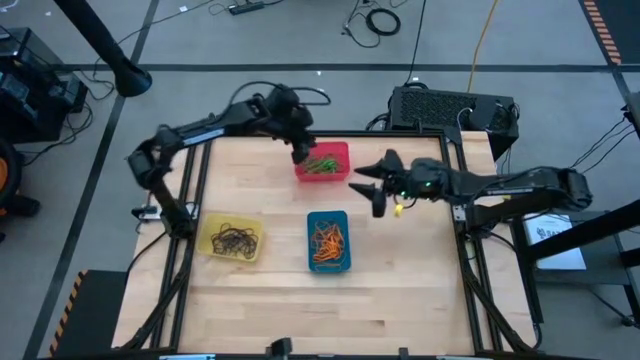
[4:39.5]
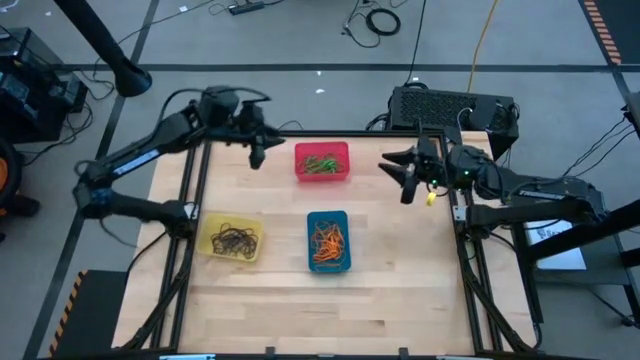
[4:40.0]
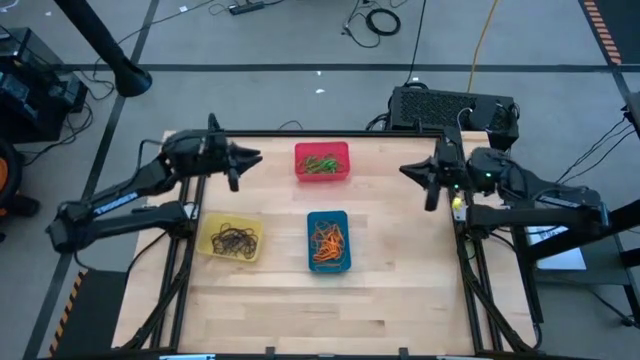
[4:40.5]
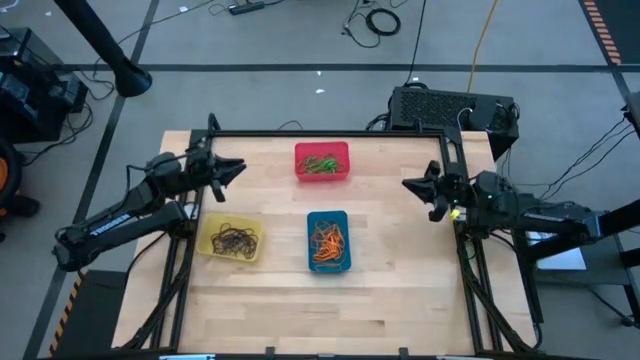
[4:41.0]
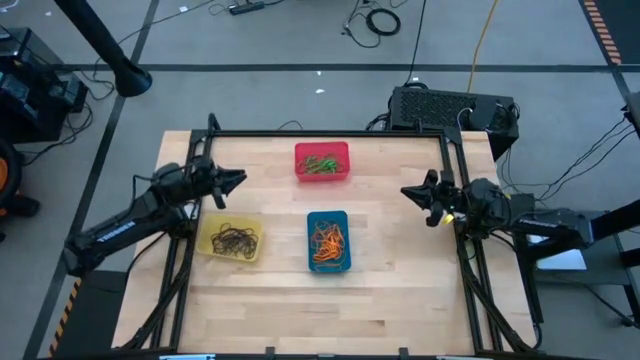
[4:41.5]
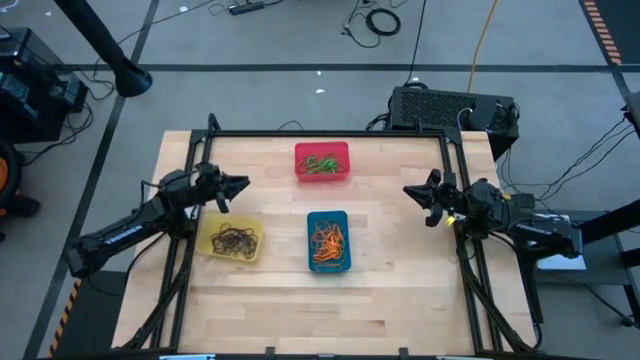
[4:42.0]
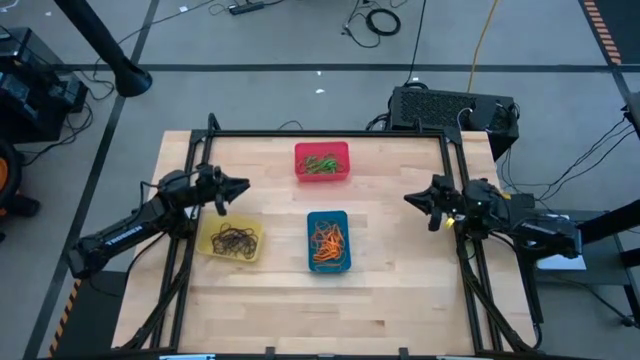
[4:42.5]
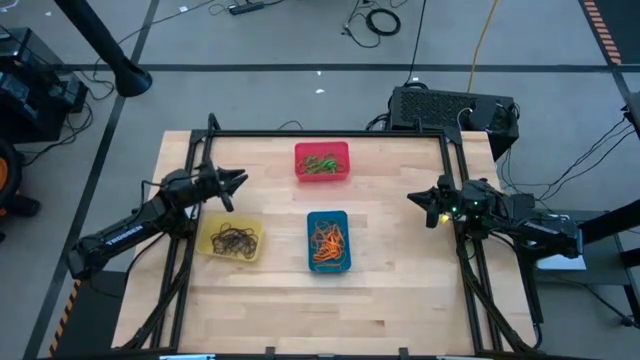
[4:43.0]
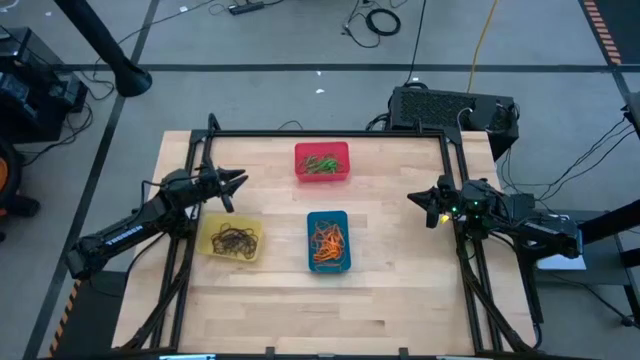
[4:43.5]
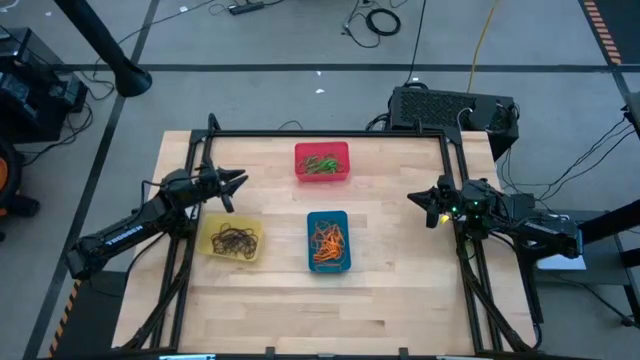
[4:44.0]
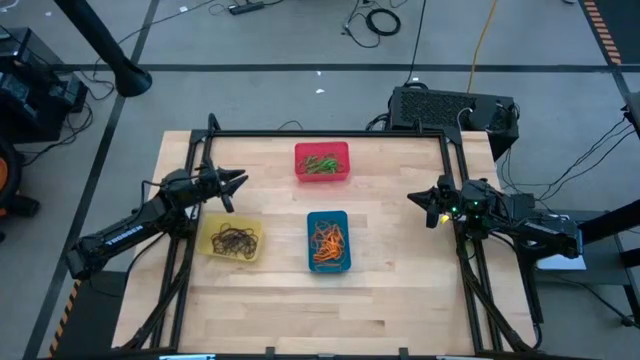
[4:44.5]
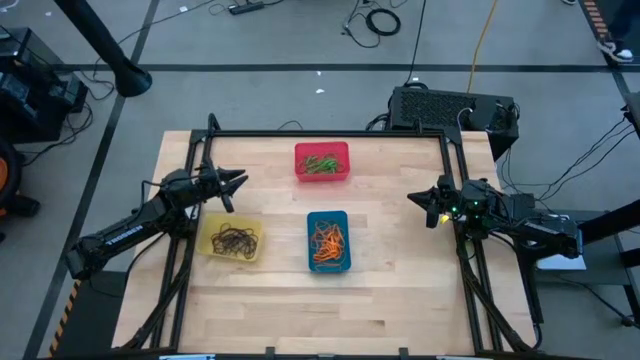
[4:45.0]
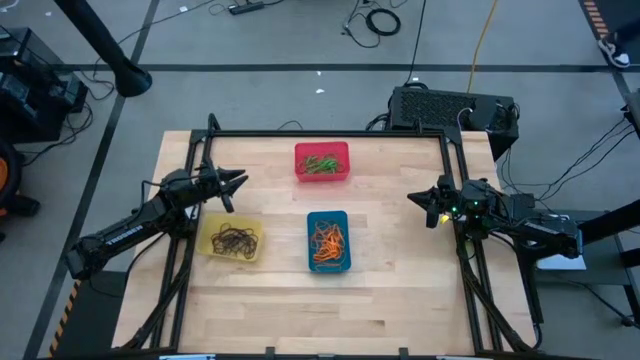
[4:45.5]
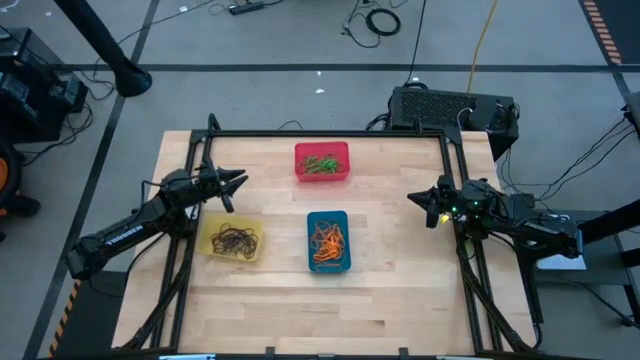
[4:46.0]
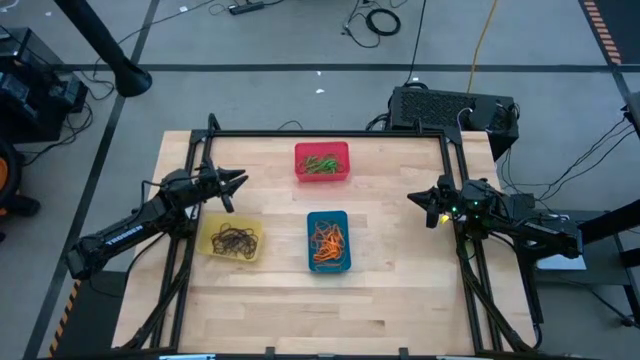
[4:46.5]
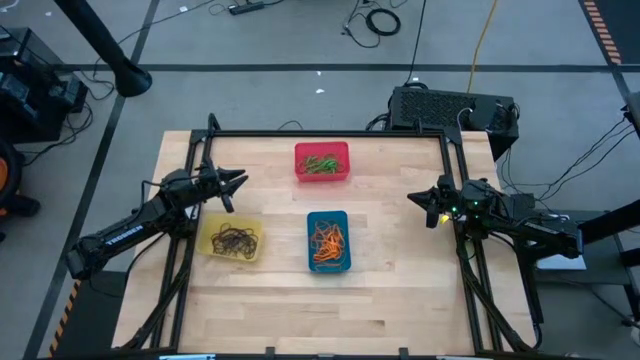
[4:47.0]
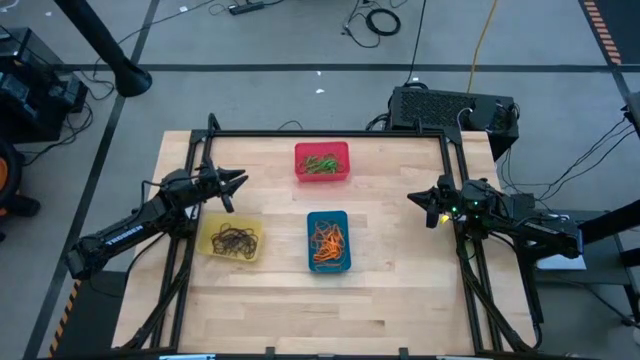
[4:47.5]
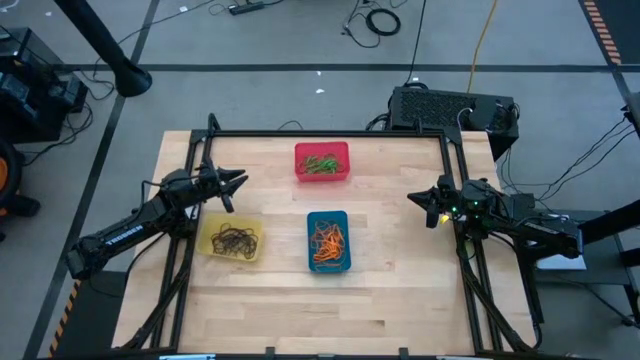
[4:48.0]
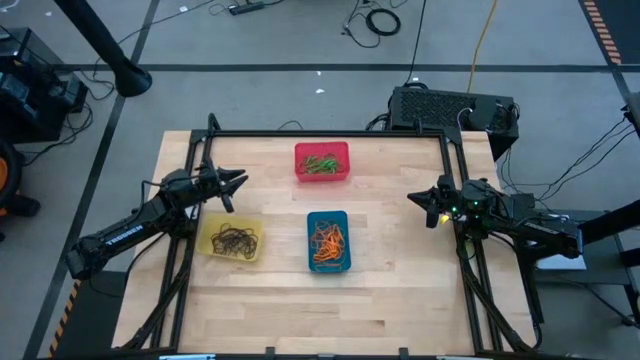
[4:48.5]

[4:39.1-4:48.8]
Task: Sort rubber bands into baskets
Return to Home Position

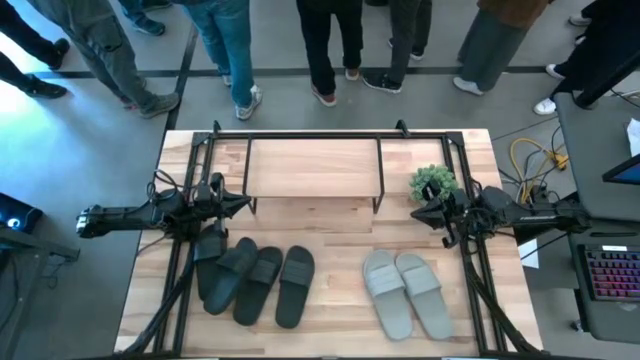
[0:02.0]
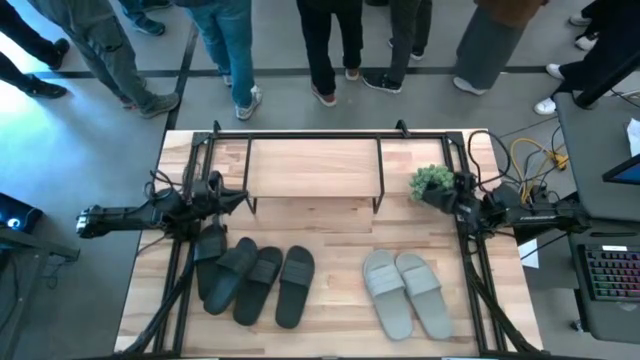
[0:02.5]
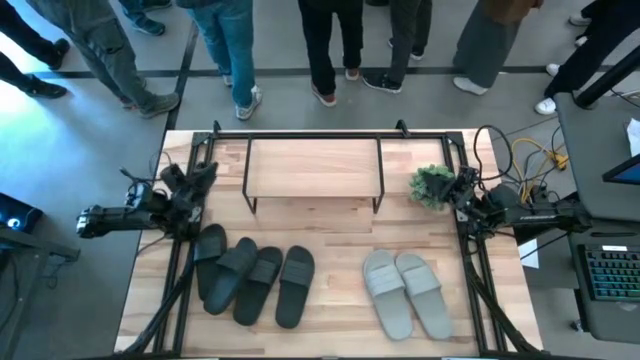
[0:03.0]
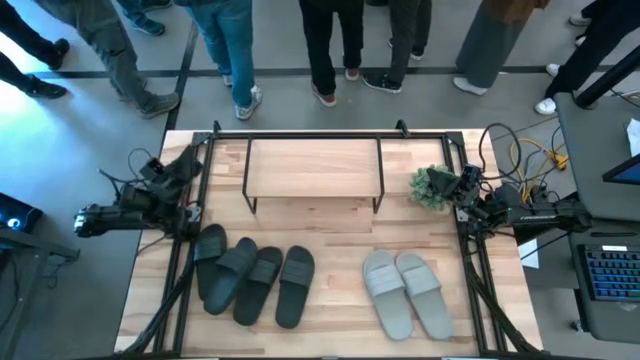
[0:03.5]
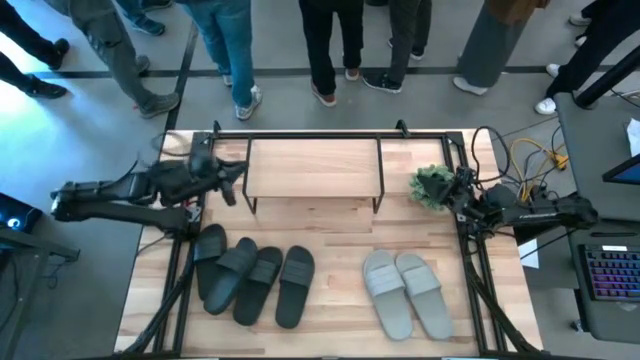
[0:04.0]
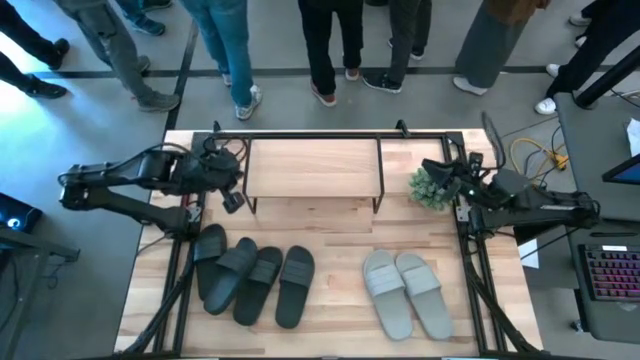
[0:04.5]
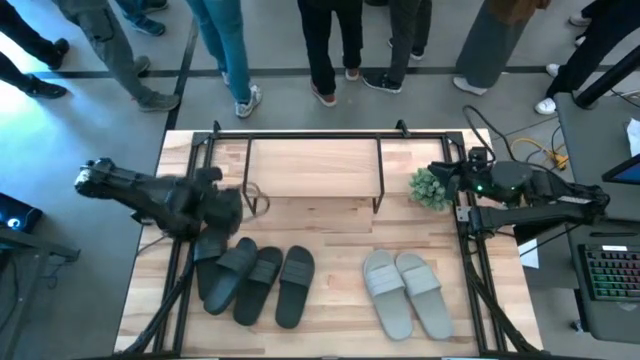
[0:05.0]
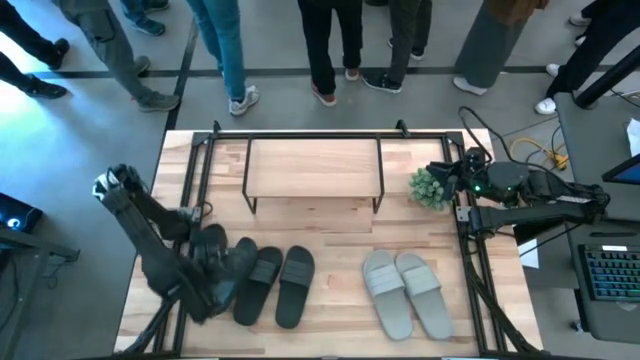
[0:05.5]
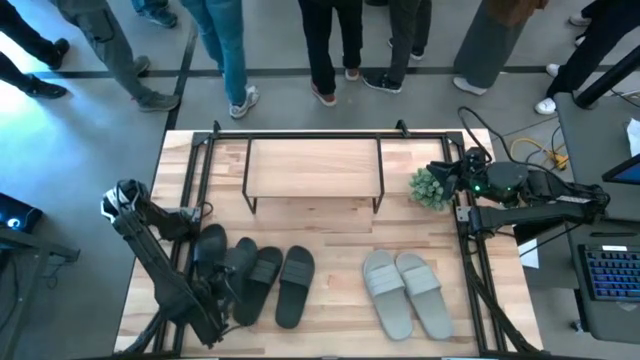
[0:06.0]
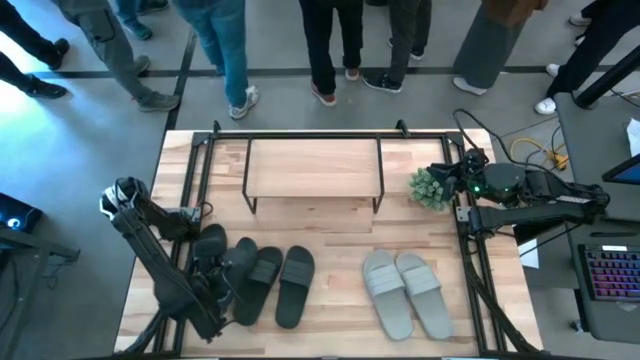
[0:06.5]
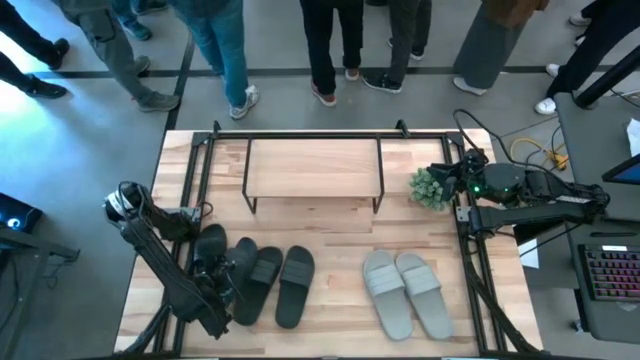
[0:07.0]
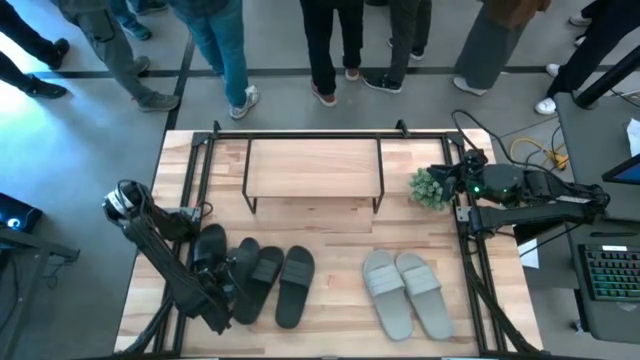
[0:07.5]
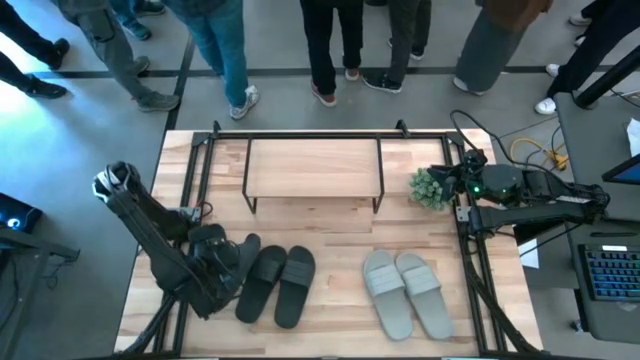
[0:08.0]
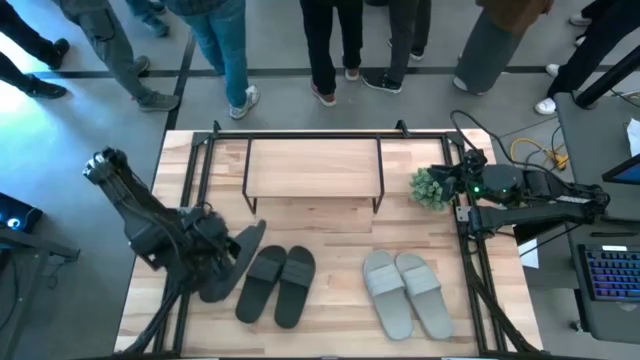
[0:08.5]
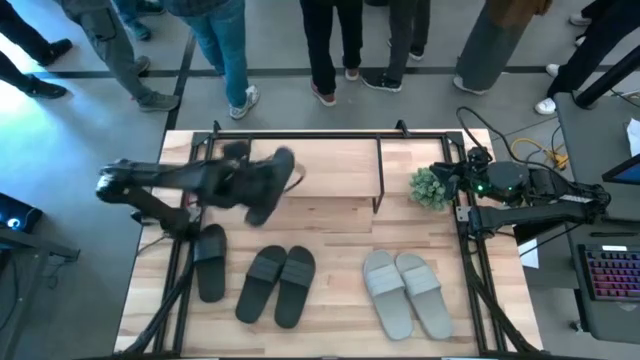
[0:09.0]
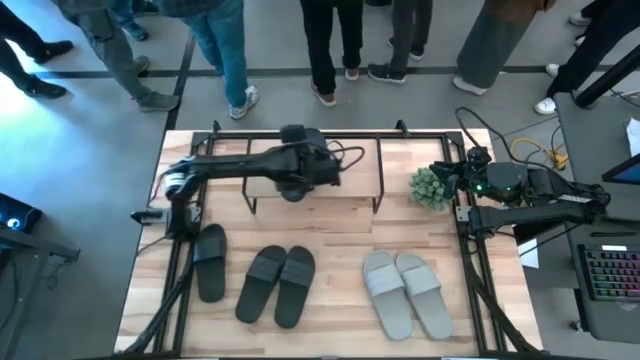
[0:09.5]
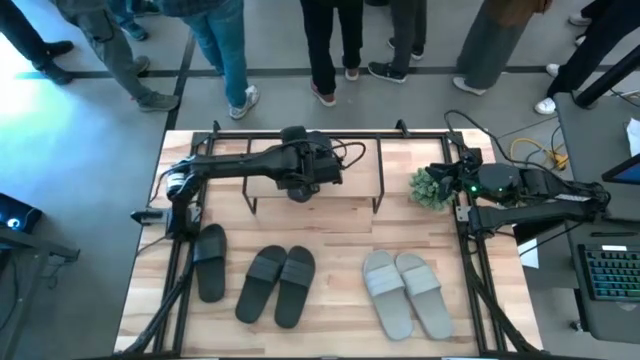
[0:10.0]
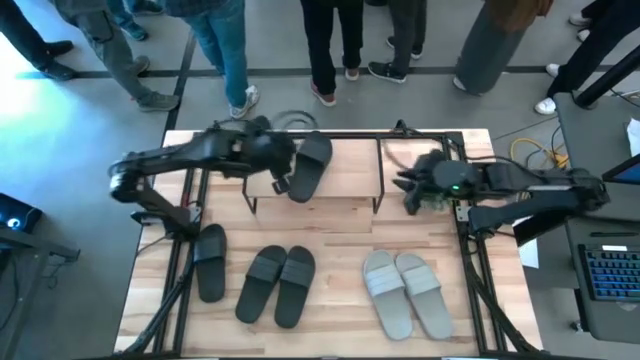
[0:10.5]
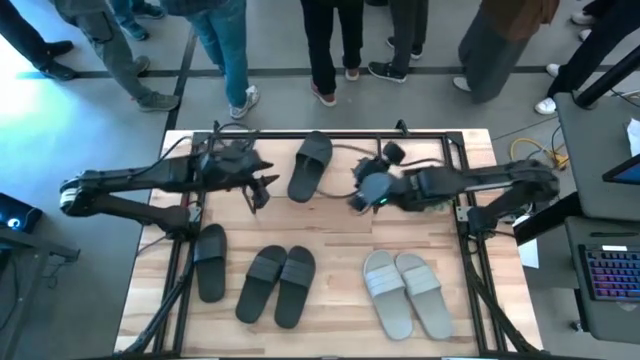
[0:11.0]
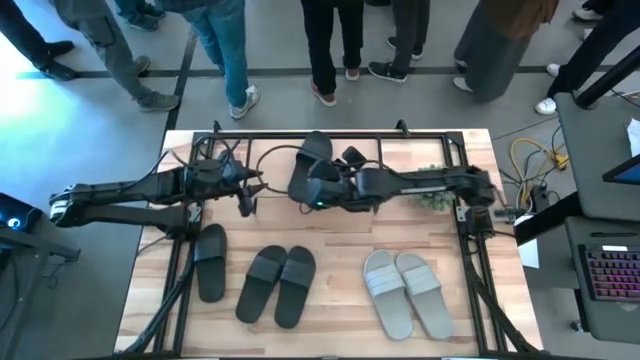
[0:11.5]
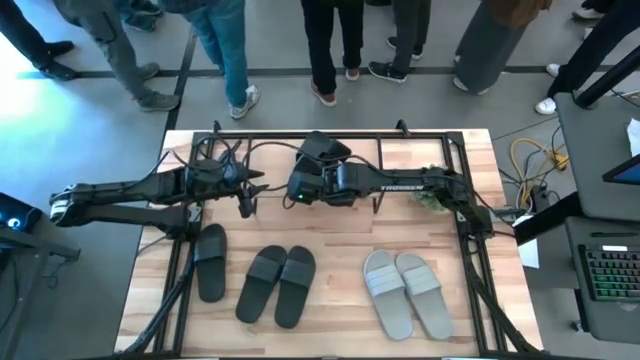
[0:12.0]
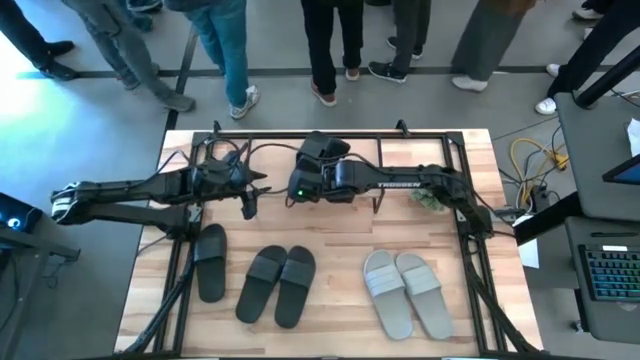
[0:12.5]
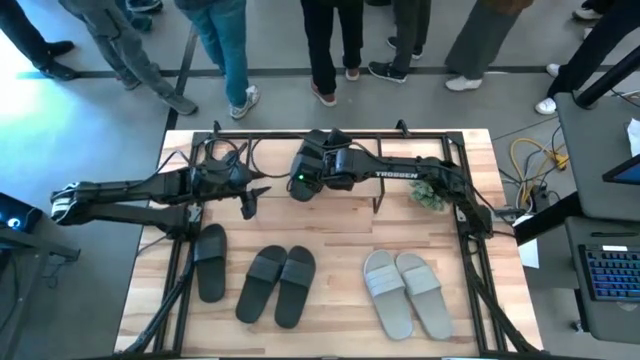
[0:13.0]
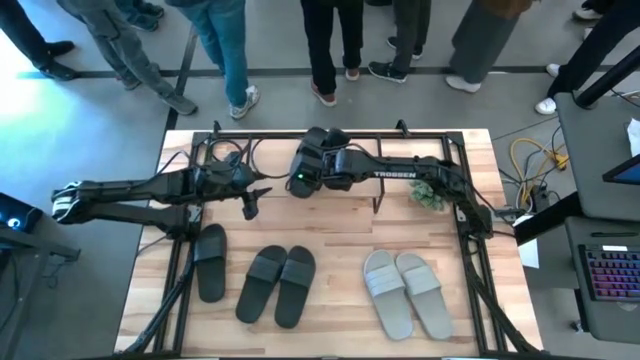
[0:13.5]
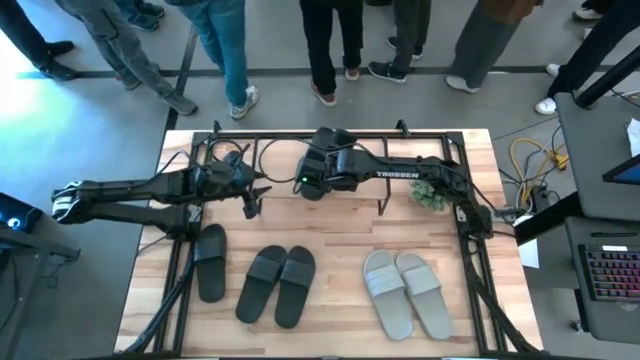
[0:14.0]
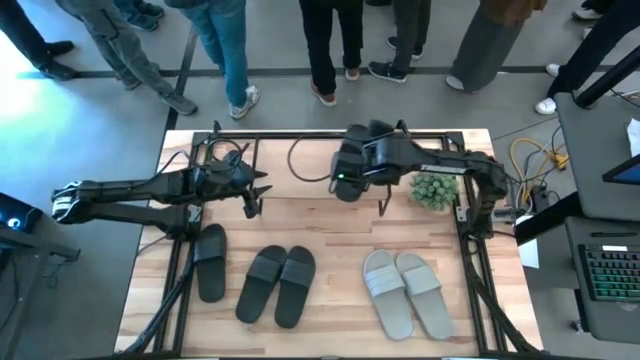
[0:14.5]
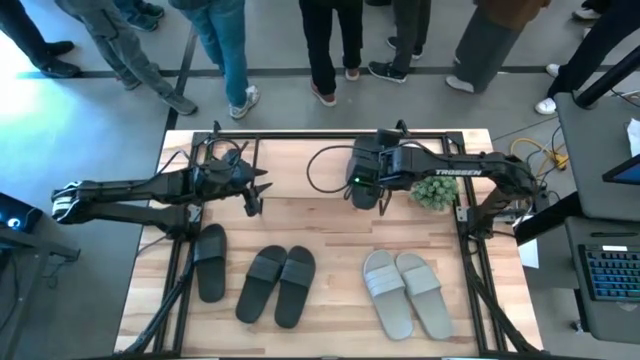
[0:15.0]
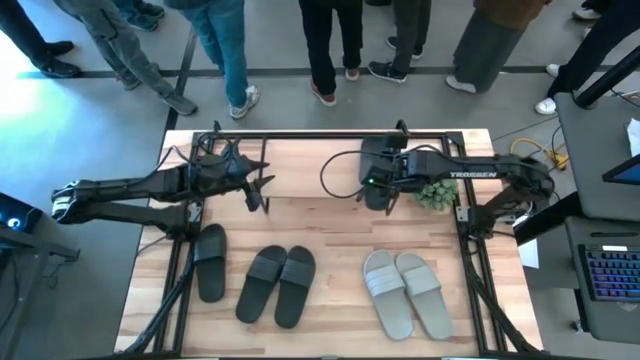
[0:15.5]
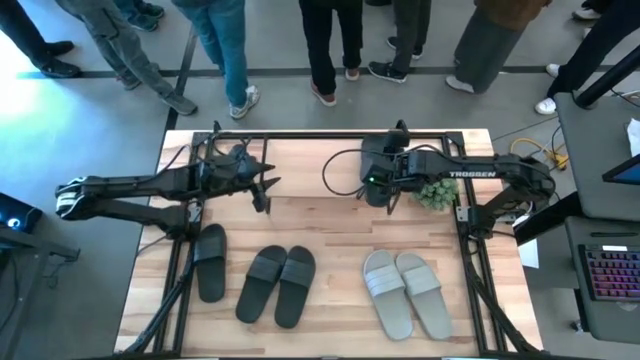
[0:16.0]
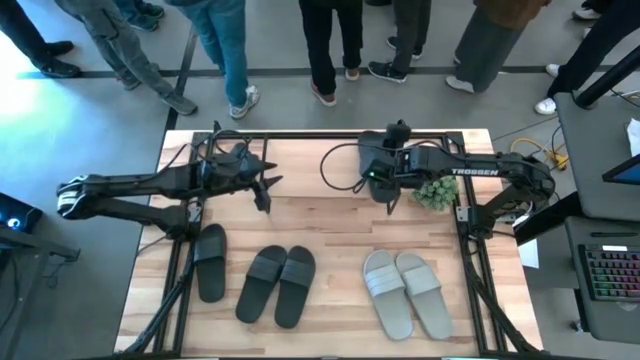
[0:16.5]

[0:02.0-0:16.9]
Task: Pick and place slides into the shelf
Put the black slide on the shelf
